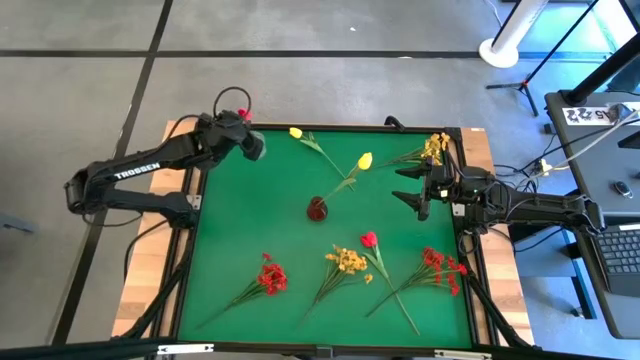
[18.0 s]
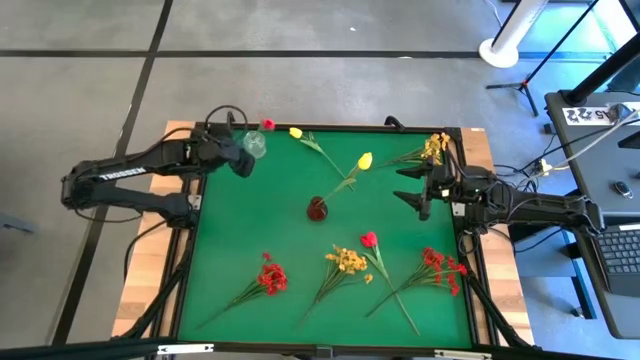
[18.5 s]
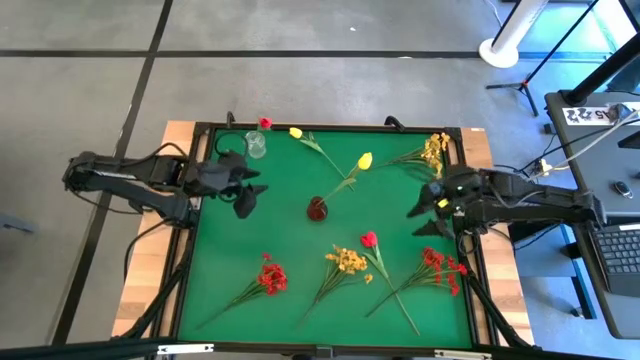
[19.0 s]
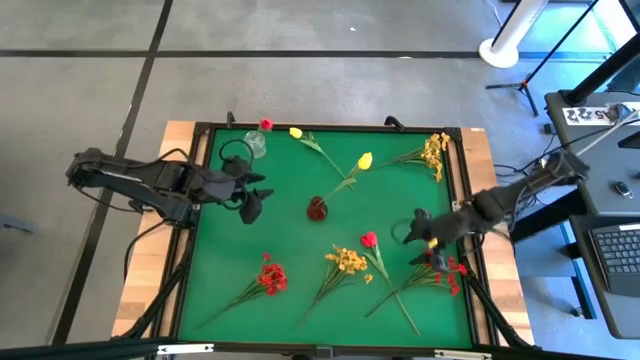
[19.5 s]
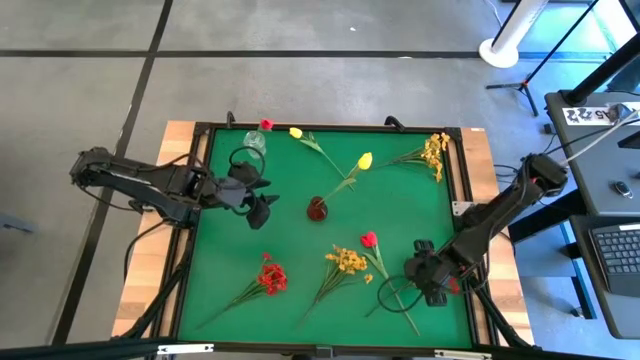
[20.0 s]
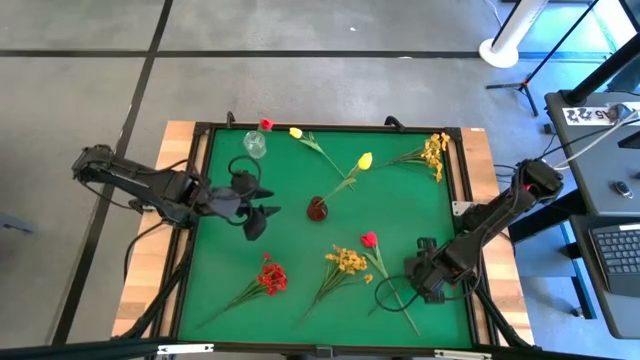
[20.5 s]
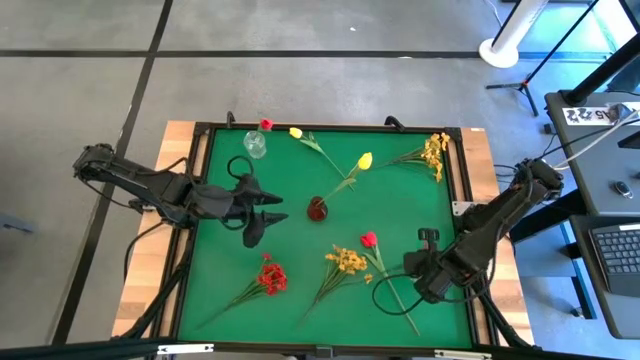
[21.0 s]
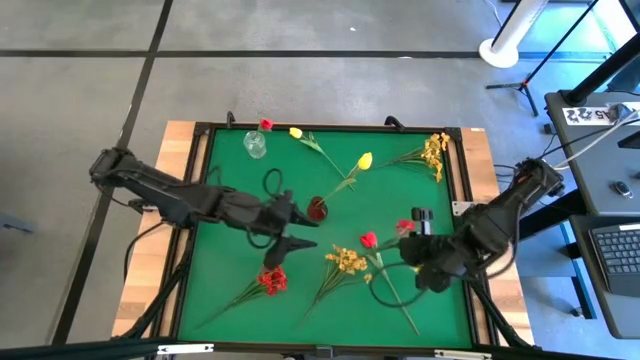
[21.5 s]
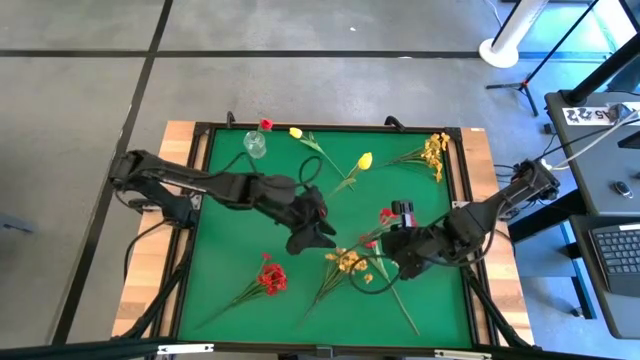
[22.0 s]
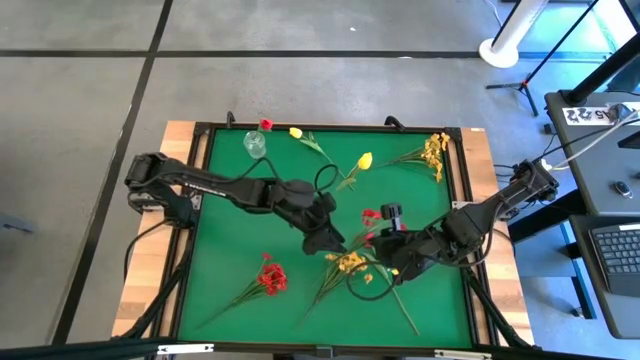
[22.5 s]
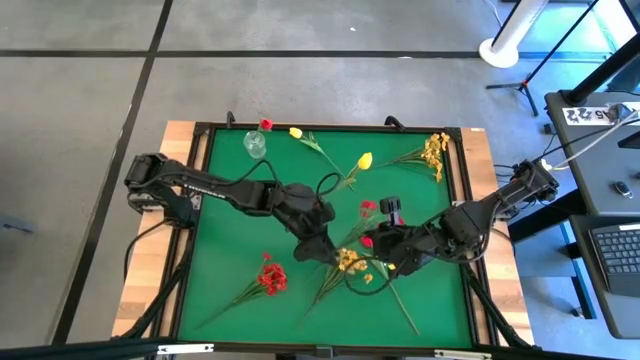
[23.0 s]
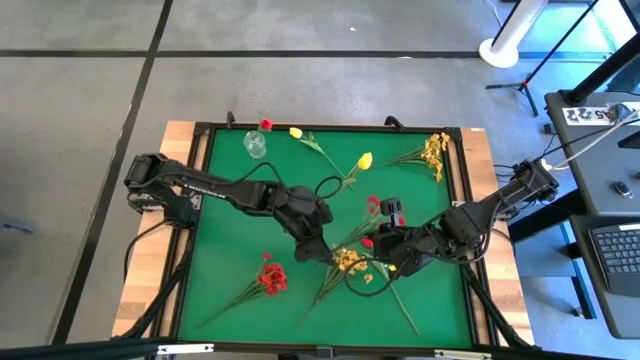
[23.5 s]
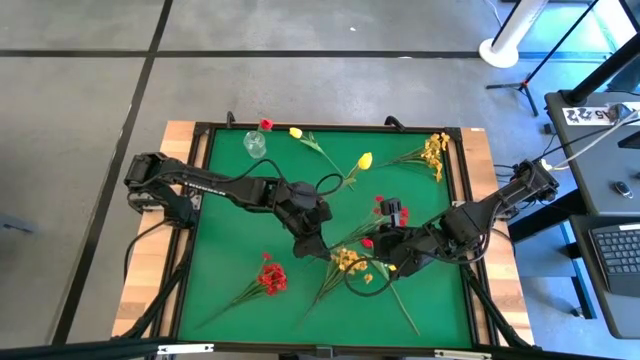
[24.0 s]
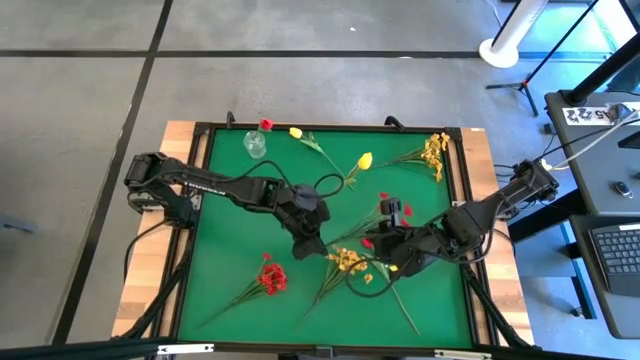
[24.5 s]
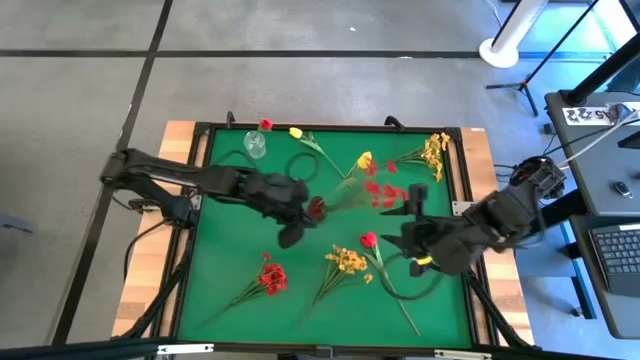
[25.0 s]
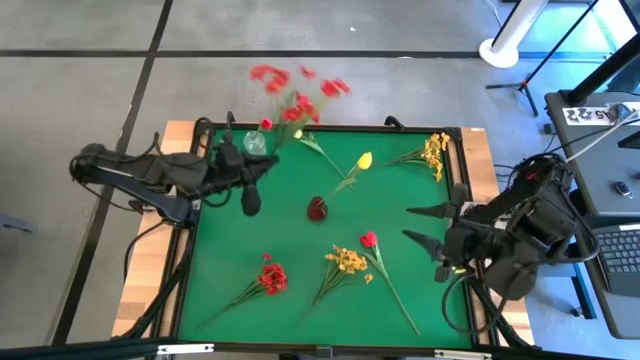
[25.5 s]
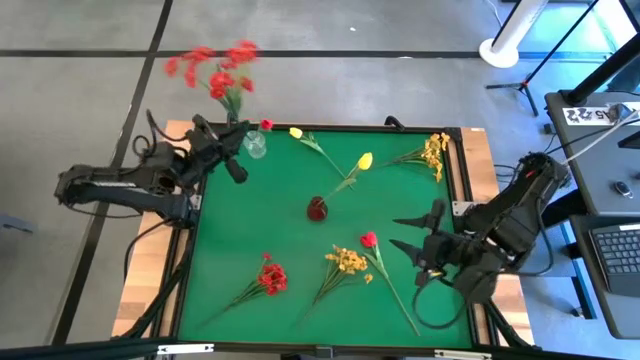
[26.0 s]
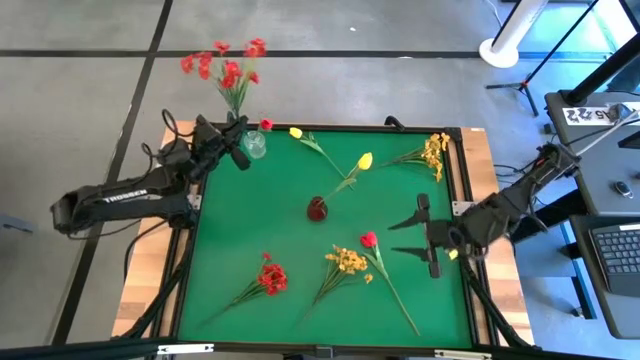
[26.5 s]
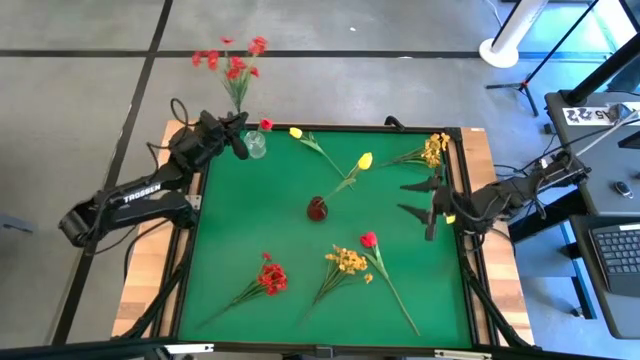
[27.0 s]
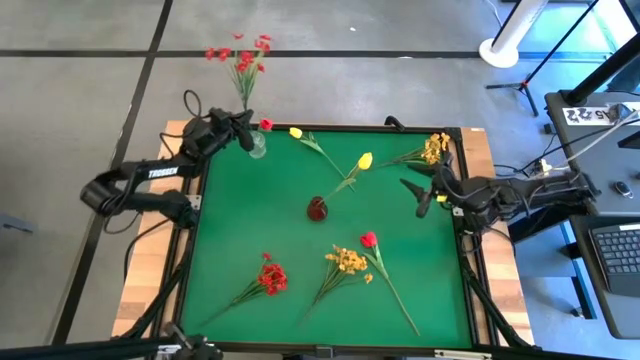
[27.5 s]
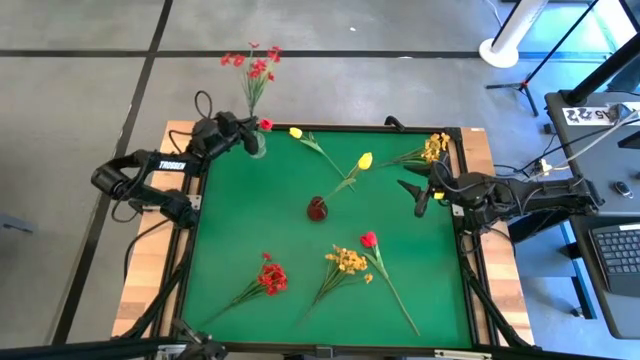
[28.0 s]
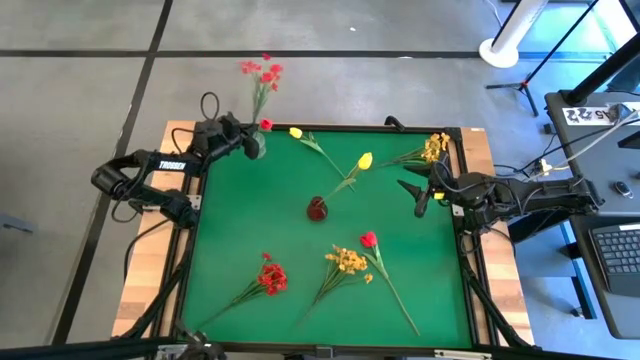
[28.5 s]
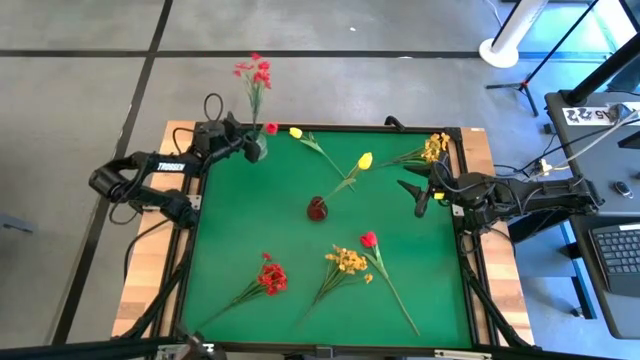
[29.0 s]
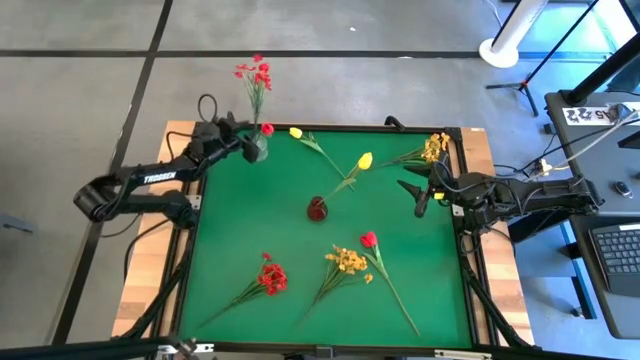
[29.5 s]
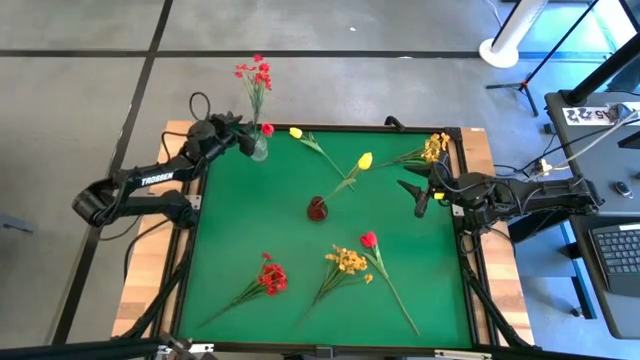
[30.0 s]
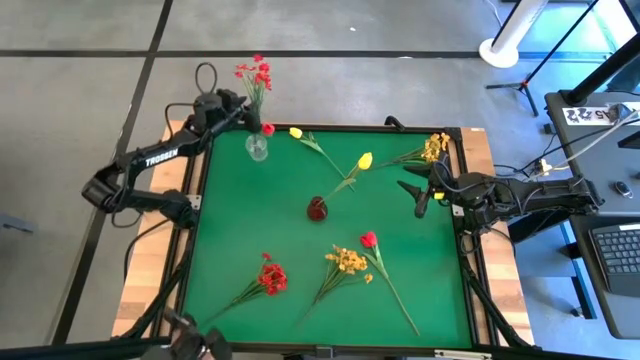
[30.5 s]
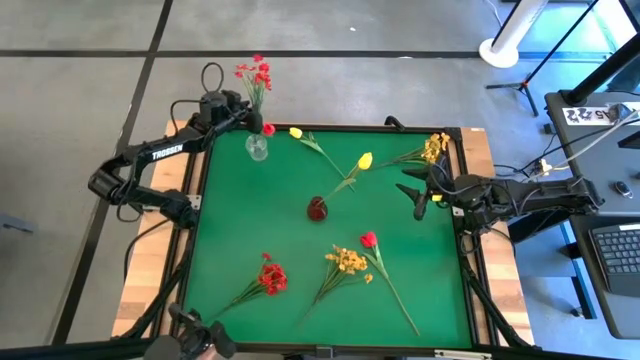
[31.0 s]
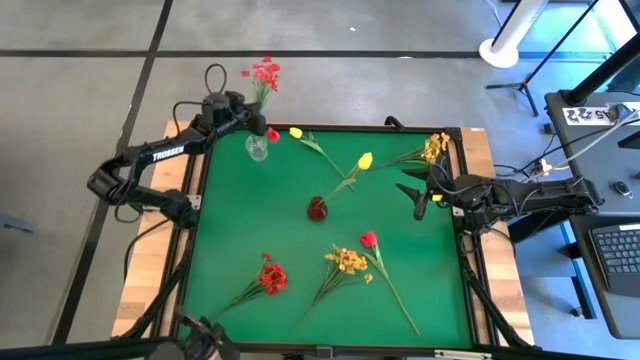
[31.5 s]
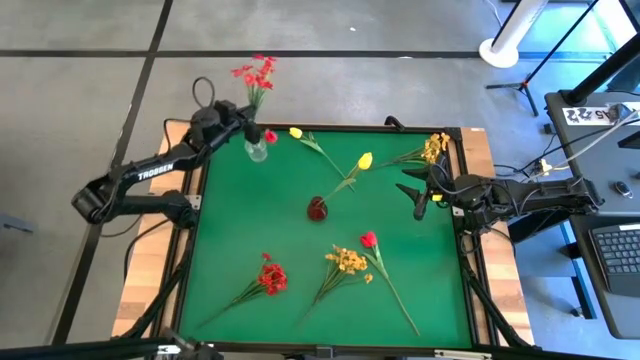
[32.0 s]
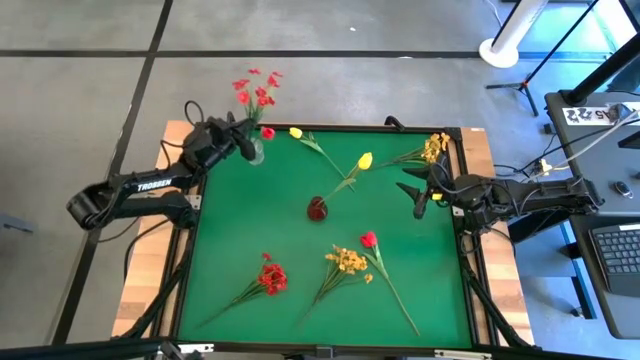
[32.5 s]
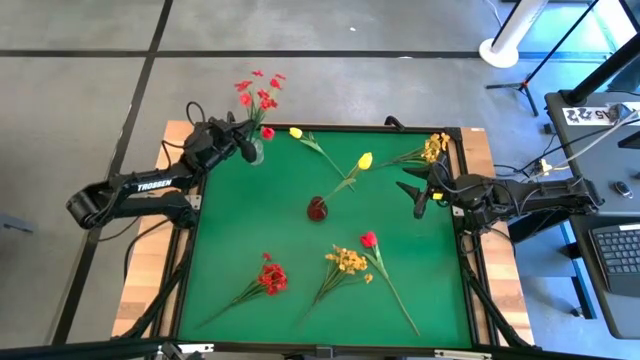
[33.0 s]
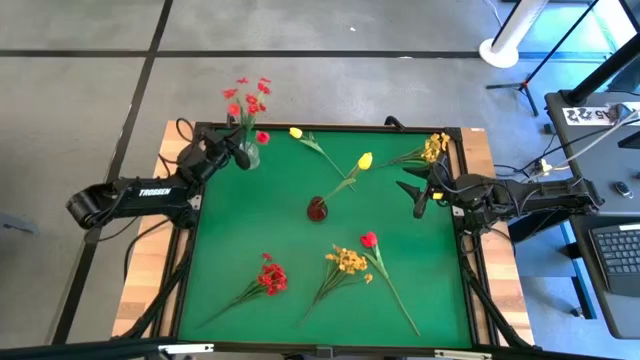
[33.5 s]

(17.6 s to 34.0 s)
Task: Sort flowers into vase by color
Put the right red flowers into the transparent flower vase

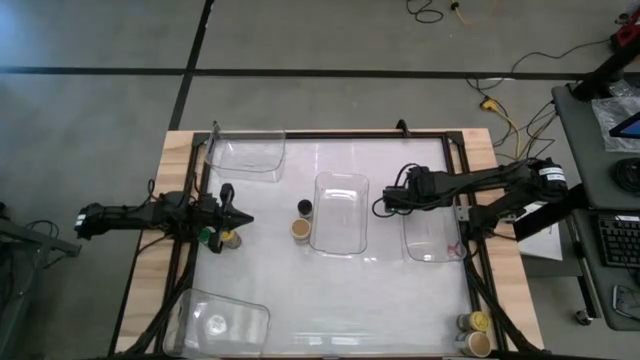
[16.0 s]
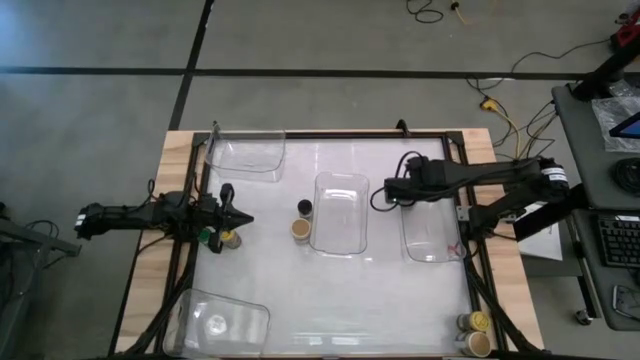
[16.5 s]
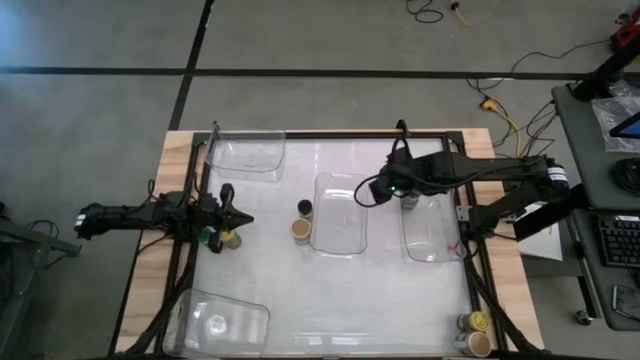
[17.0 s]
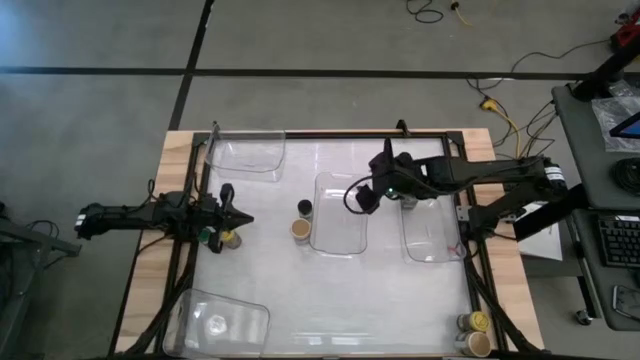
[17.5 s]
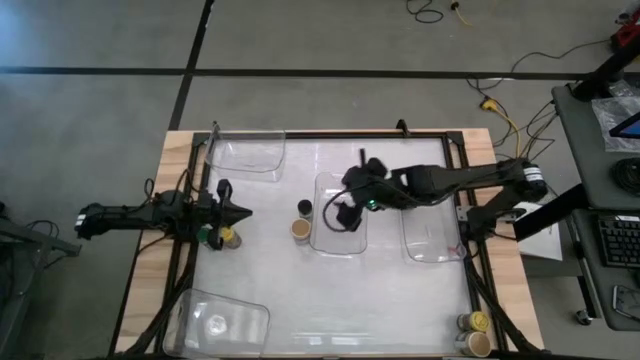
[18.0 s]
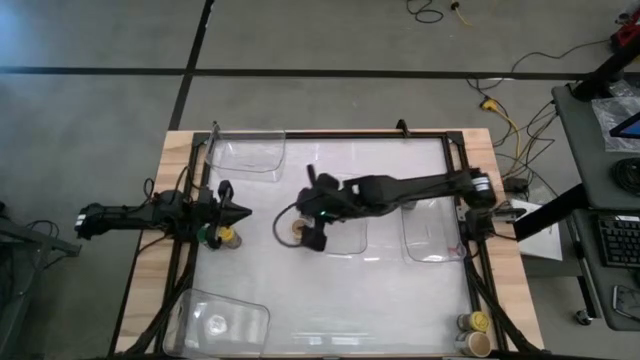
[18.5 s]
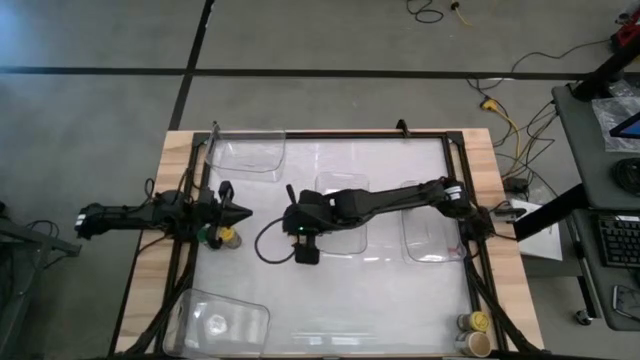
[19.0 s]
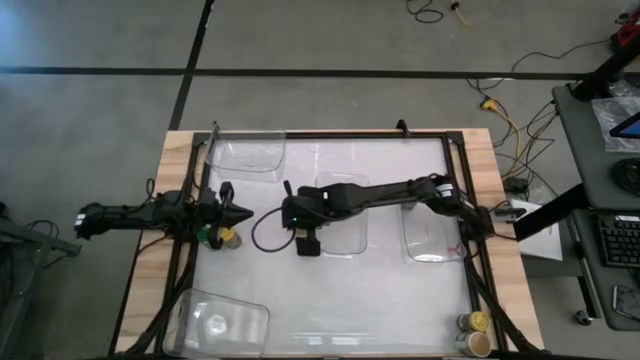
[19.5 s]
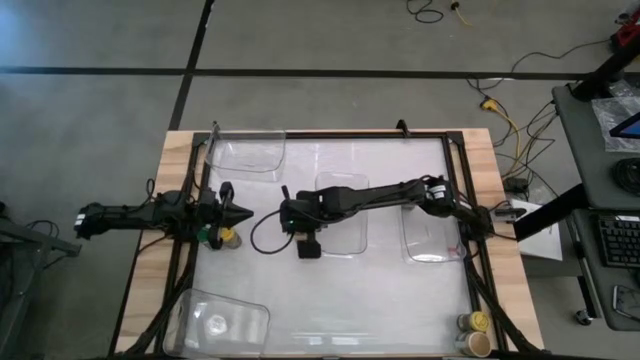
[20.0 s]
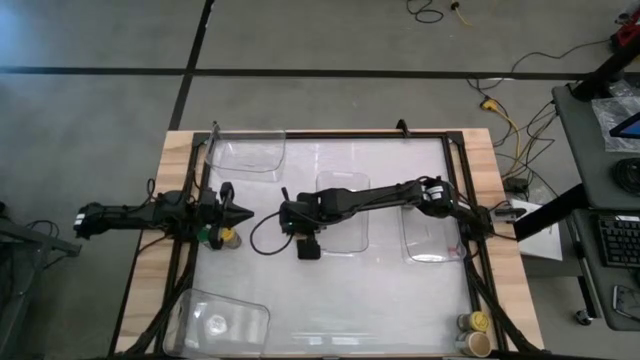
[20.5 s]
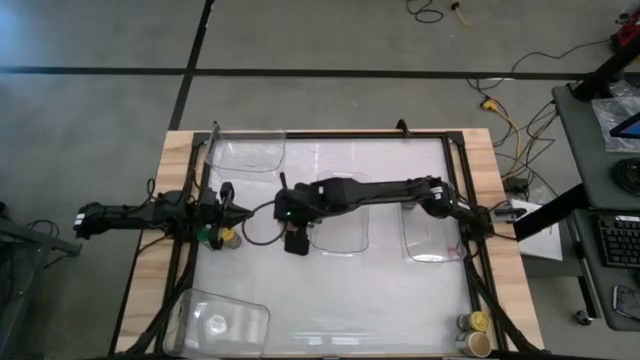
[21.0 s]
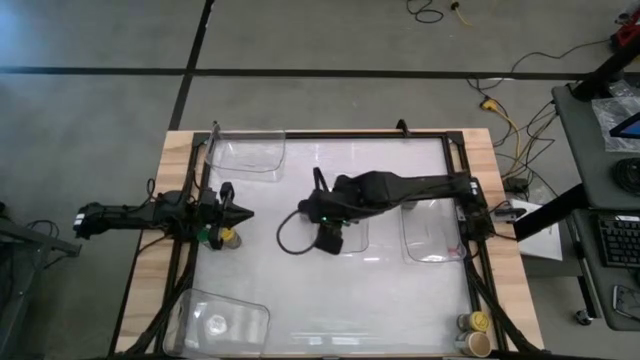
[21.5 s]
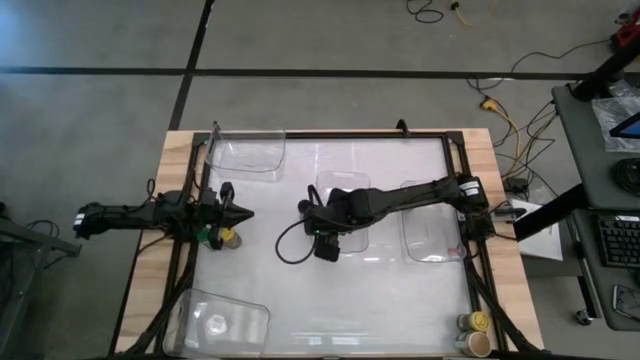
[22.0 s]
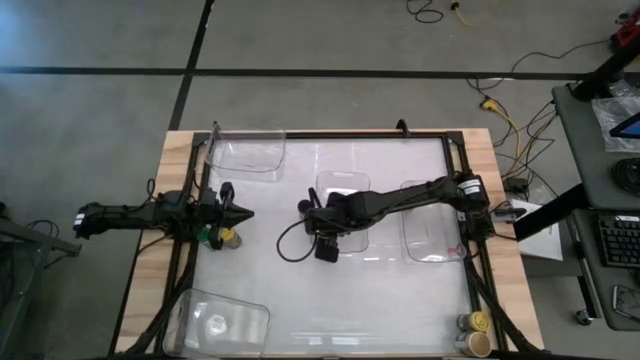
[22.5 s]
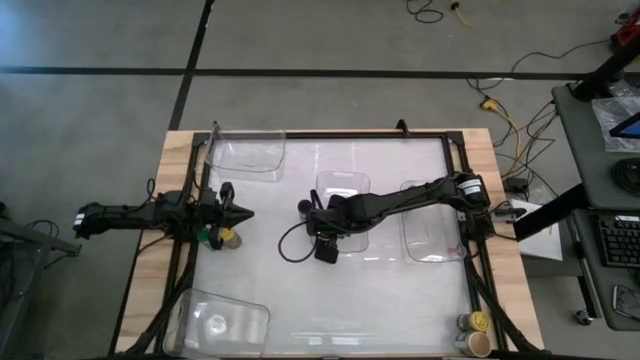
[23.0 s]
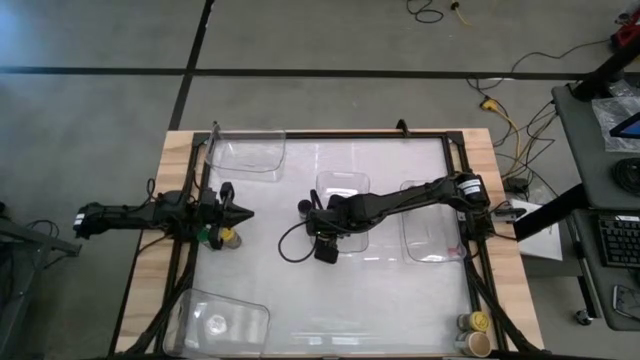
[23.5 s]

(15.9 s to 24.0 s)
Task: Sort spices by type
Put the top gold seasoning bottle into the center transparent bin
